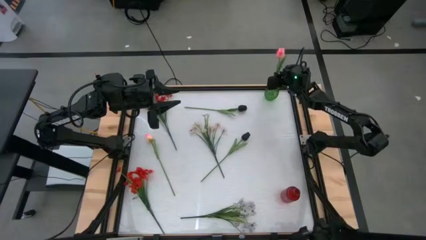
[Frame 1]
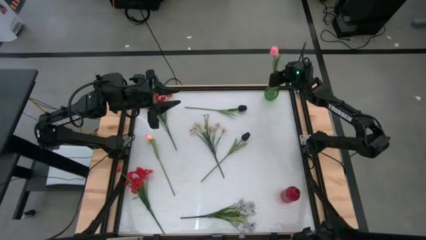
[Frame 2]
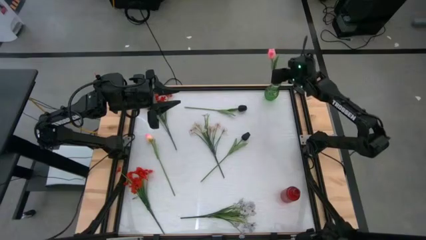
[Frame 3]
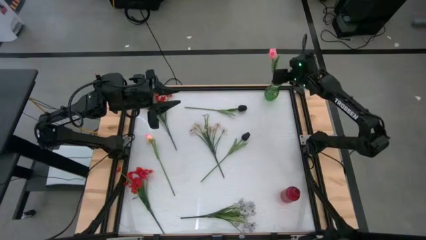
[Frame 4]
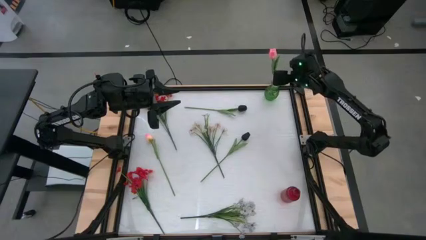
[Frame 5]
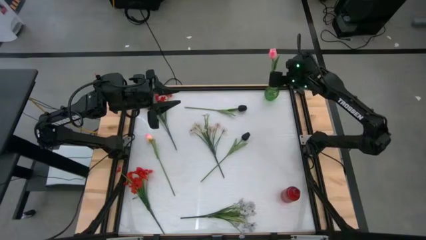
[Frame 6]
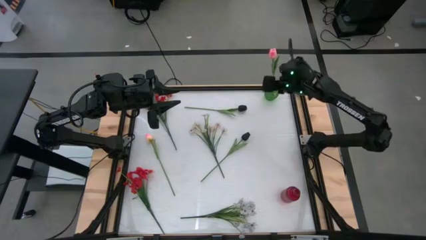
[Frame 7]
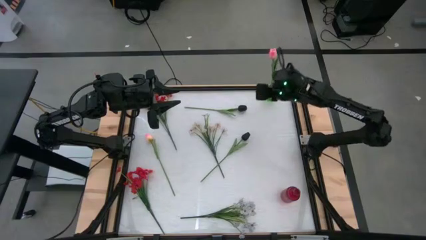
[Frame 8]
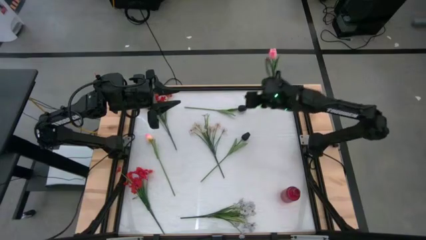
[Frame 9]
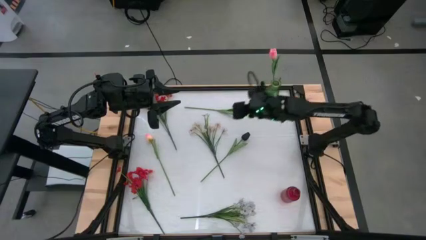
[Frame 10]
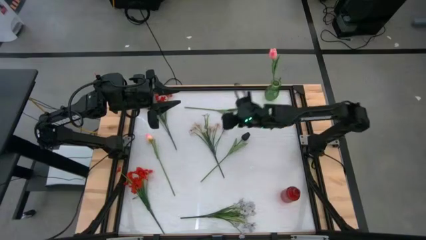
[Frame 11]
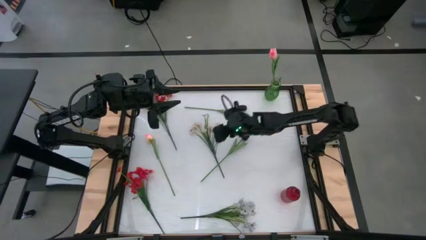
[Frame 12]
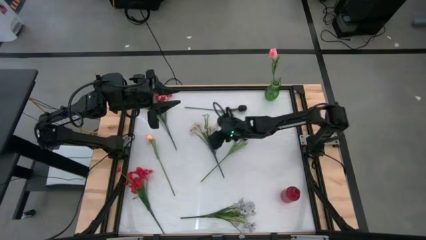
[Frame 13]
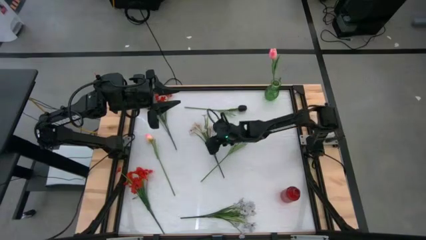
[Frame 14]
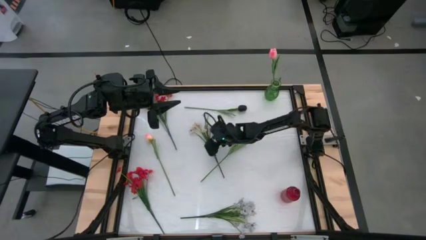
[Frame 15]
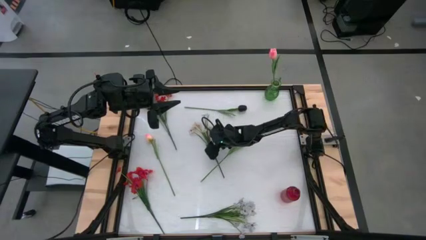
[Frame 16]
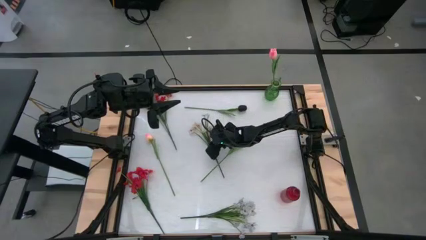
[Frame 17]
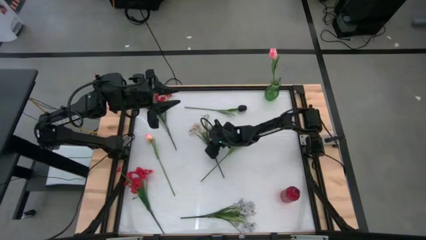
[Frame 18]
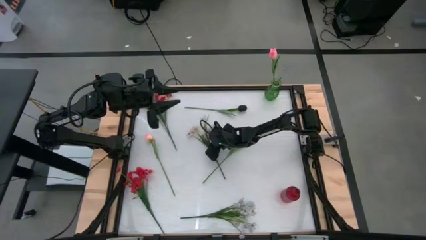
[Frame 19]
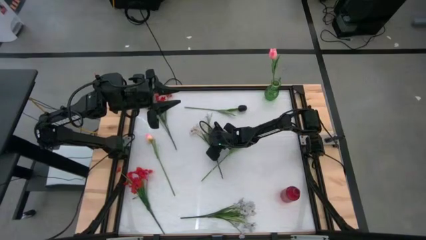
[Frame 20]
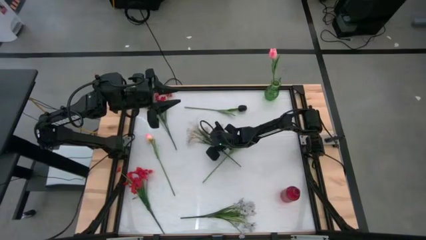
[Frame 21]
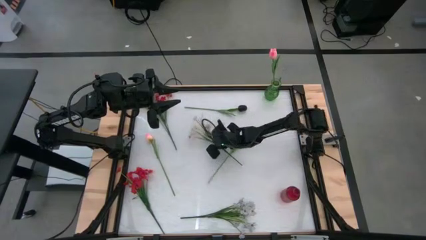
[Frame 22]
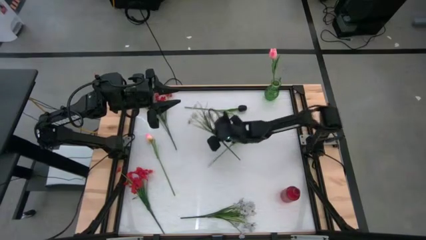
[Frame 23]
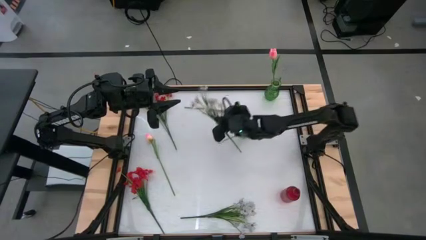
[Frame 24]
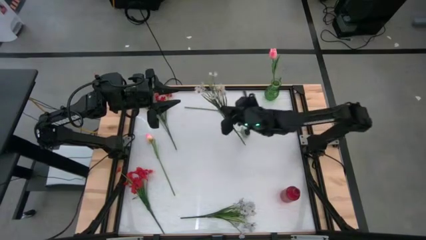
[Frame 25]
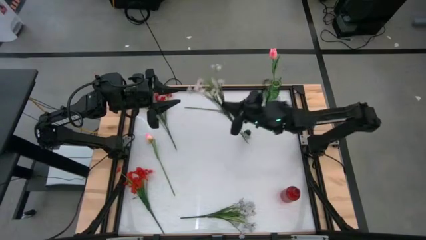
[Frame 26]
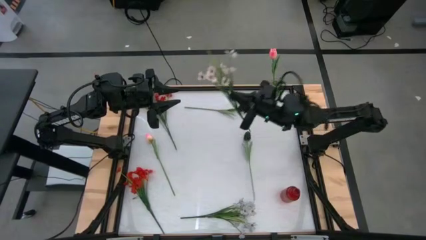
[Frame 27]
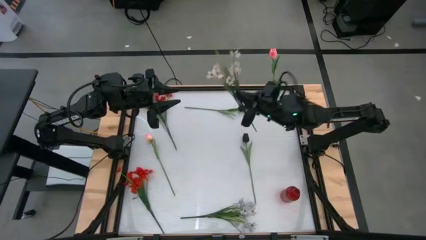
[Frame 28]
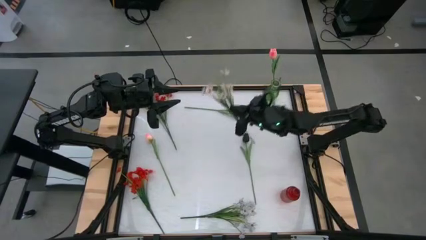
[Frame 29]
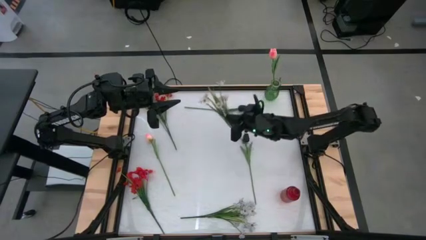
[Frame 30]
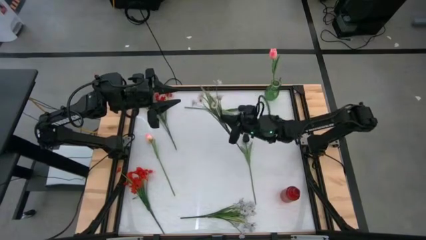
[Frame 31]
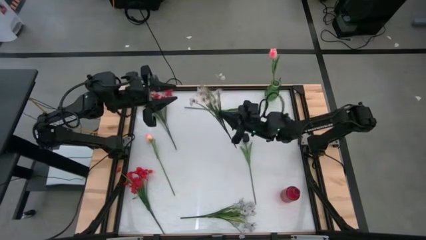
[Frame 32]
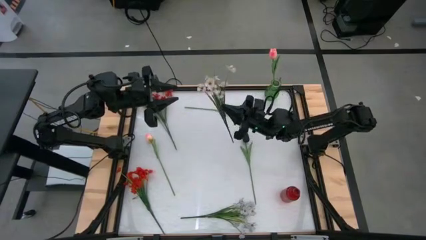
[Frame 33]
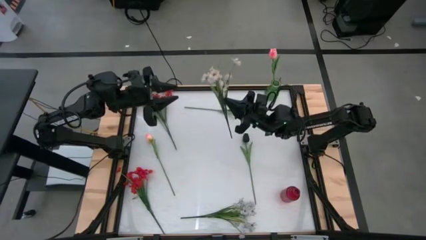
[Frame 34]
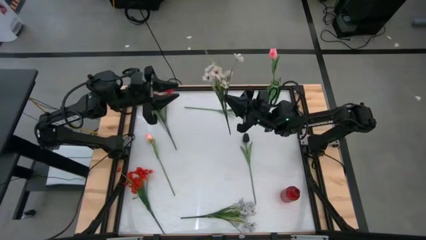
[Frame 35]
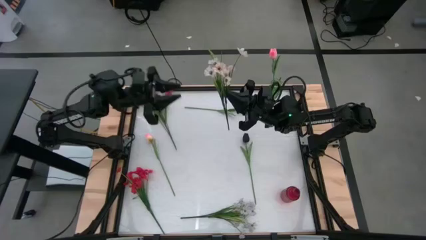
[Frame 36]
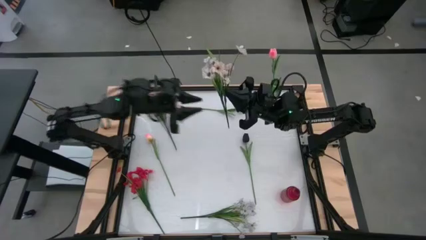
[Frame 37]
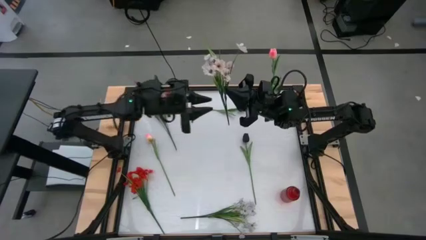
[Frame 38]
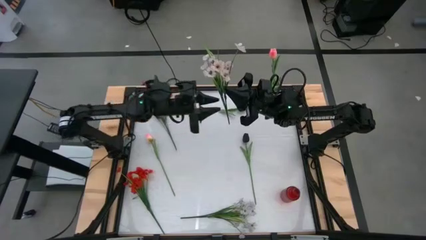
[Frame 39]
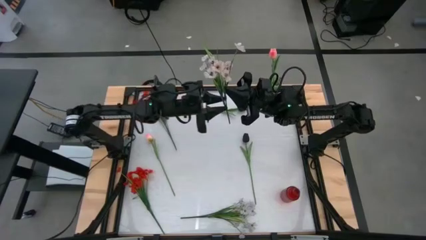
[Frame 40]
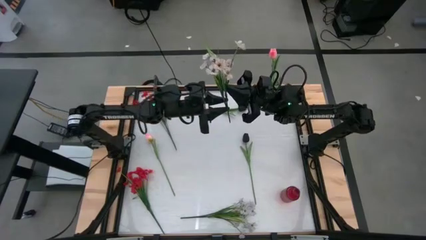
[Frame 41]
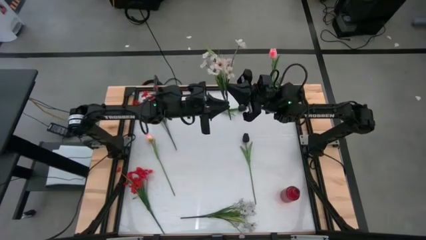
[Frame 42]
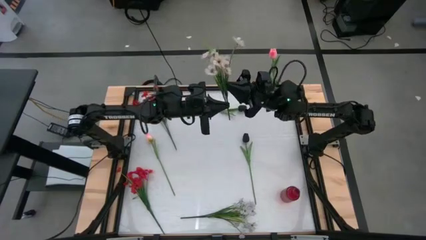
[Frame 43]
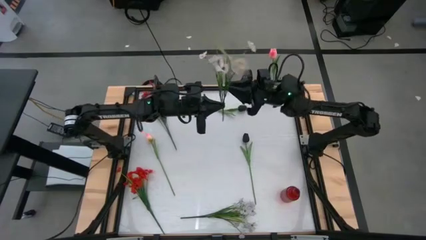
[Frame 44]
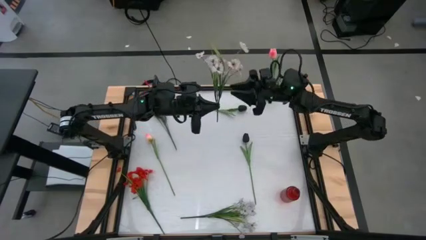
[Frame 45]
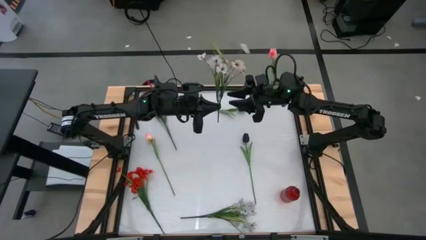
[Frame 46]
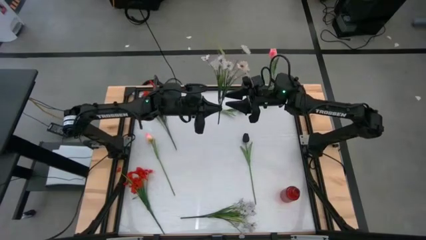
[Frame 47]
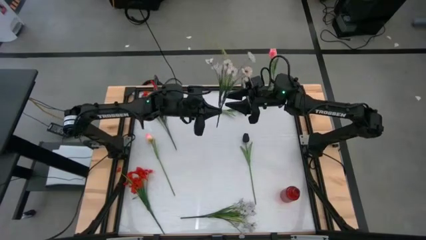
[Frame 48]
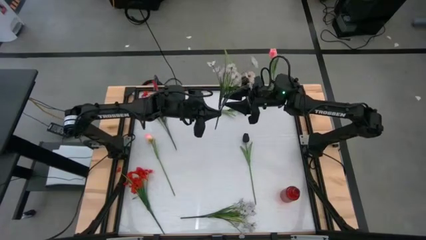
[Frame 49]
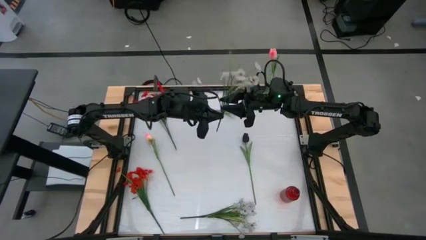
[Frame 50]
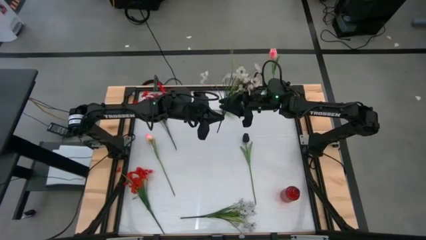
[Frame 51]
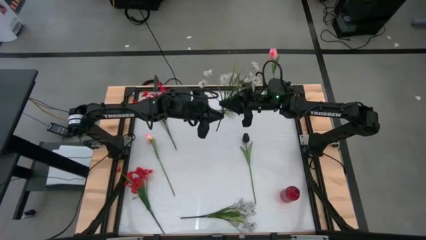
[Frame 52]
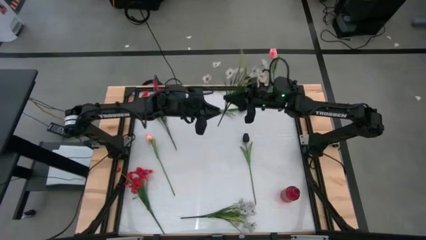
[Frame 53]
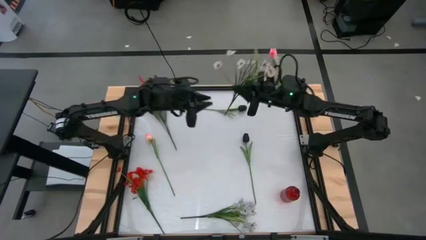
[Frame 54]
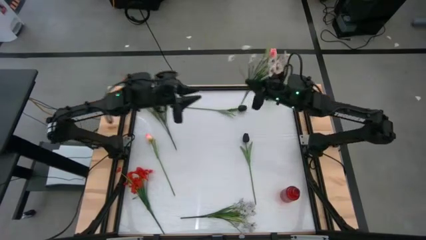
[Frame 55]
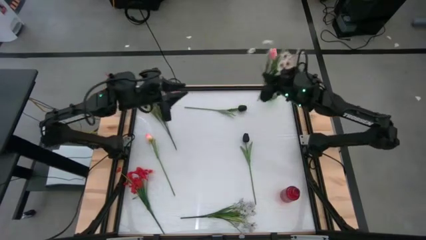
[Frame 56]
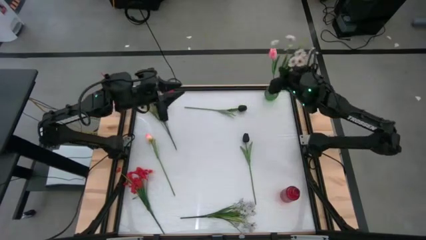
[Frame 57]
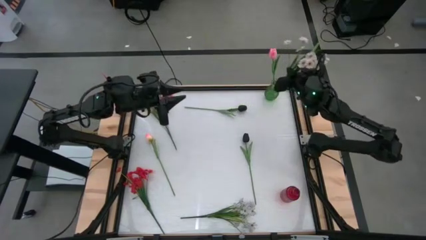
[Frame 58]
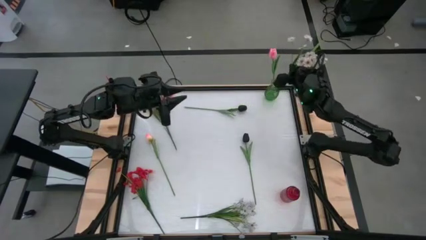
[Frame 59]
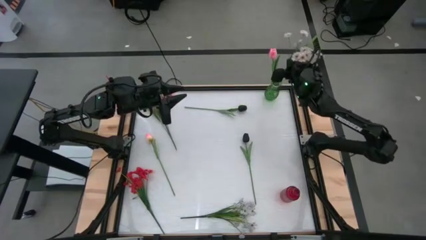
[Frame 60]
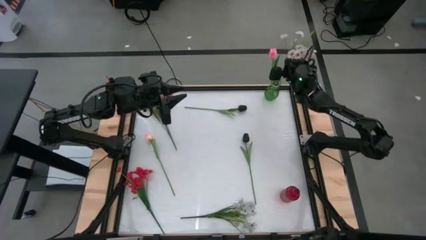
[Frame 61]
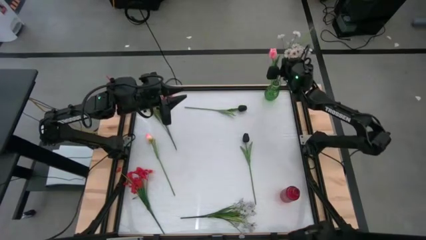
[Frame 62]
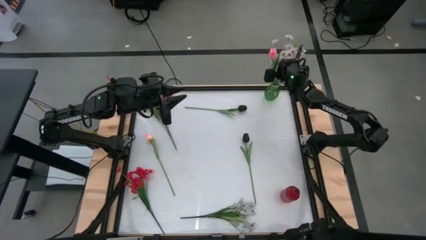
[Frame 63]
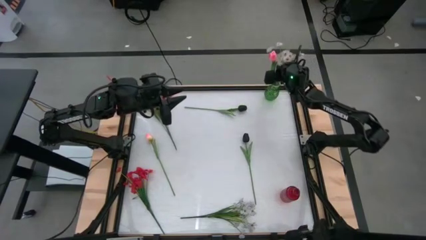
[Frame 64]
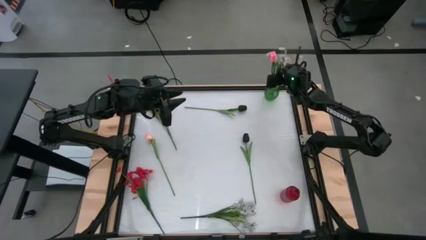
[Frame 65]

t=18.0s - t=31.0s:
Task: Sort flowers into vase by color
Put the top white flower into the green vase
